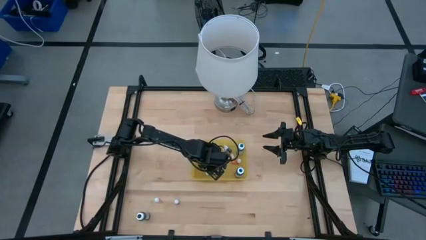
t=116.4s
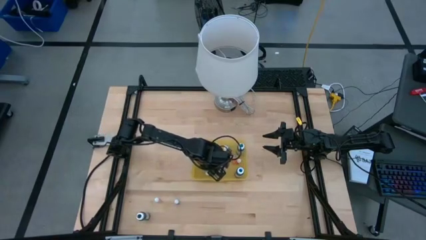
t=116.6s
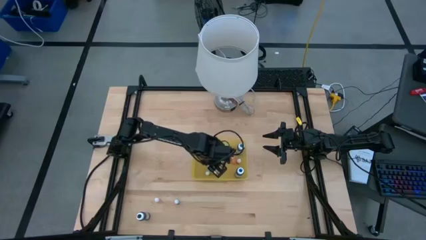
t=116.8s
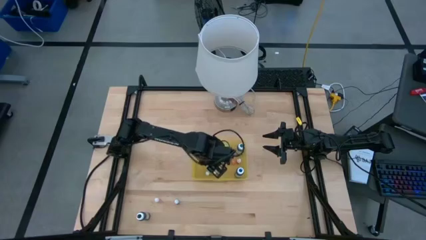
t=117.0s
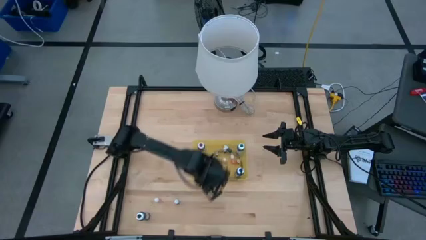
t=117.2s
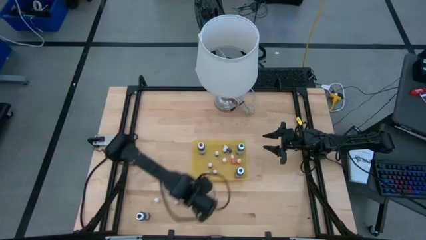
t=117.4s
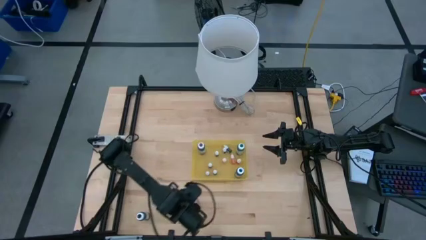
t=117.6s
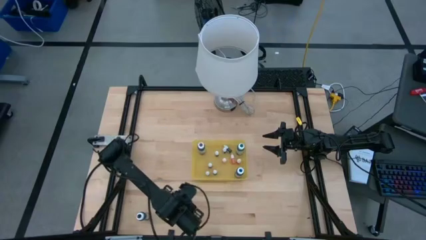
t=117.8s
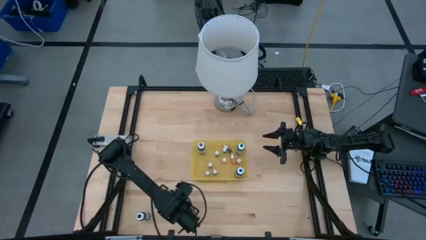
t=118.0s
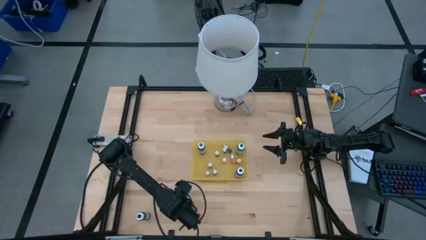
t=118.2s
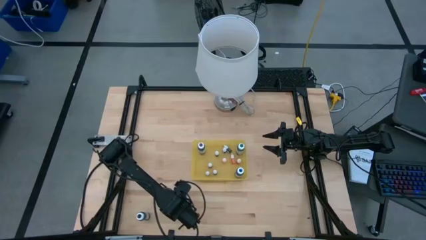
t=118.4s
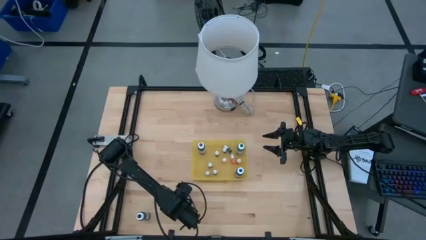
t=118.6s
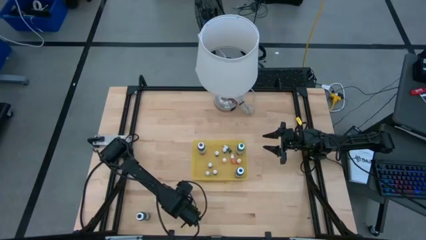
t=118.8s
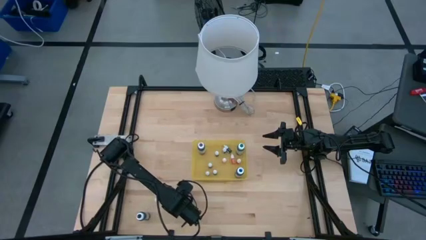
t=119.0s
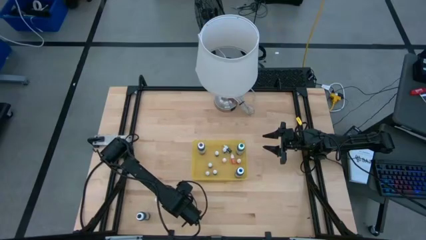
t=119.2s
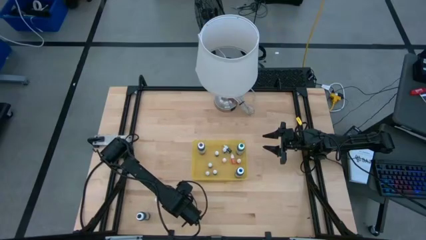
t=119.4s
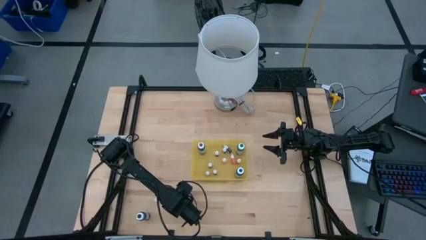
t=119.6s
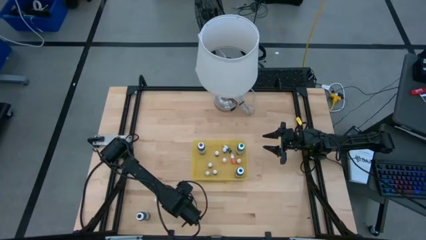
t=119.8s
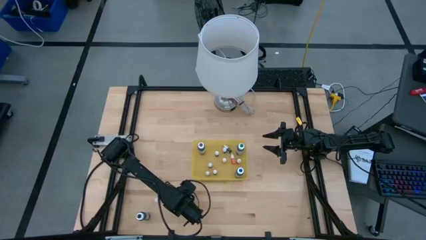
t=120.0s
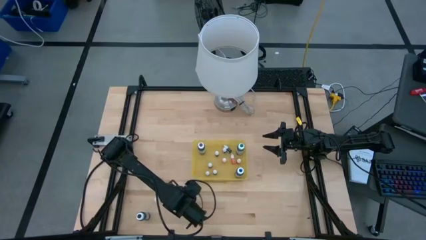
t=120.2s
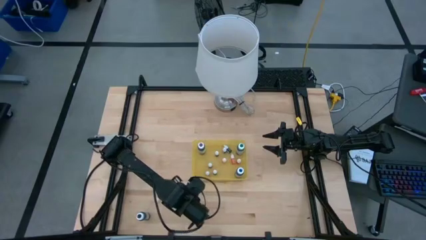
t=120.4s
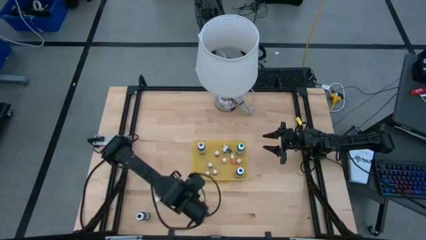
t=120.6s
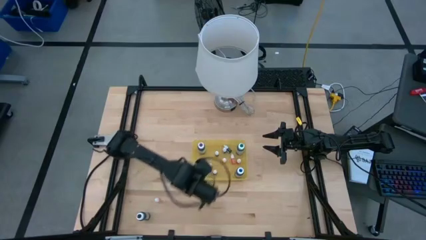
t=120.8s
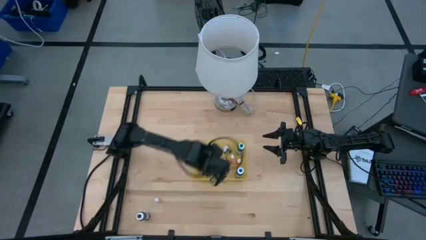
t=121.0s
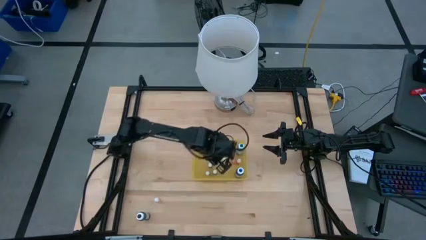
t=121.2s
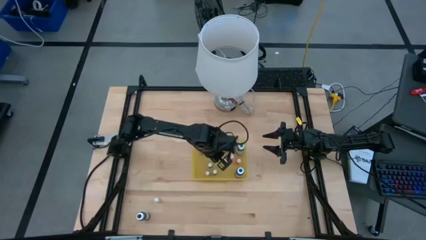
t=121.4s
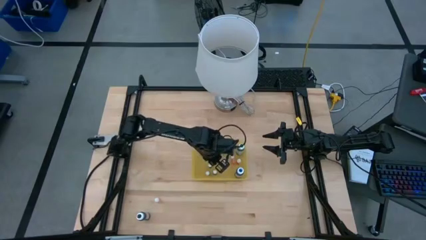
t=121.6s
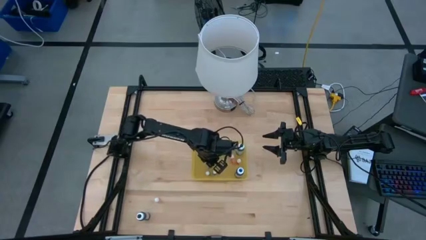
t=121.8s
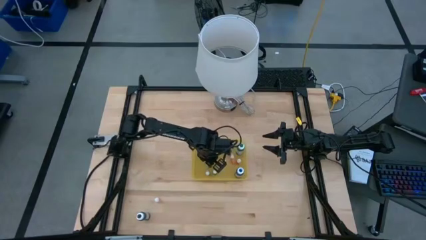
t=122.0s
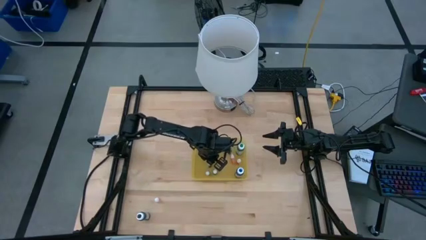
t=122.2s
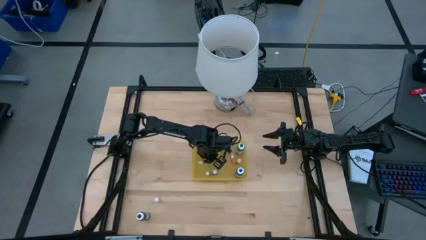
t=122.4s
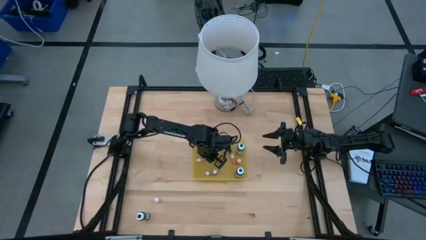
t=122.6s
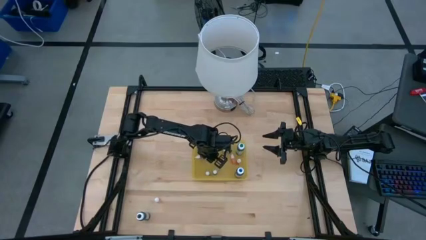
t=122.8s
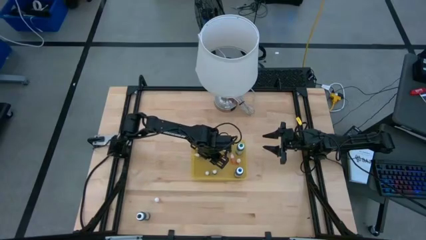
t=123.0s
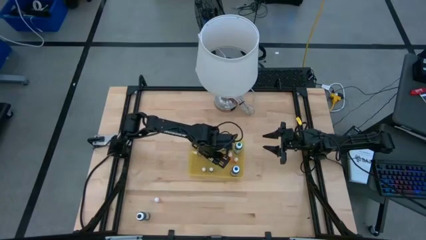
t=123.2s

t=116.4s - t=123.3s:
Task: Pick & Place food coloring
Put the blue food coloring bottle into the yellow bin

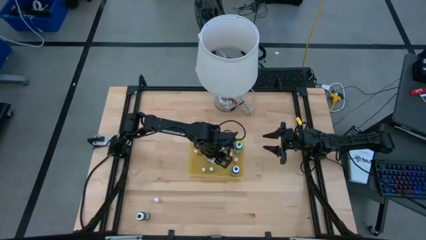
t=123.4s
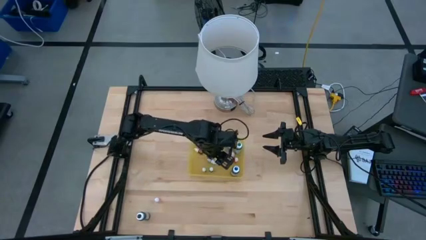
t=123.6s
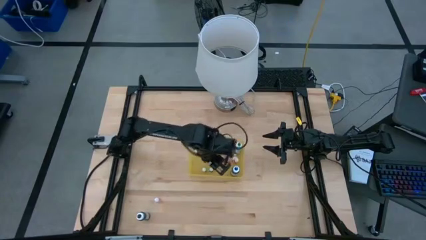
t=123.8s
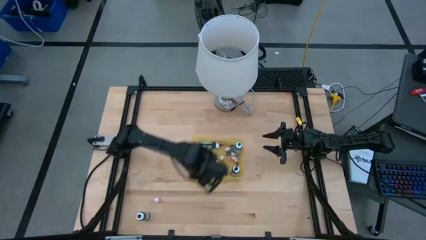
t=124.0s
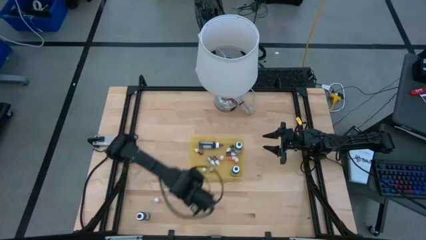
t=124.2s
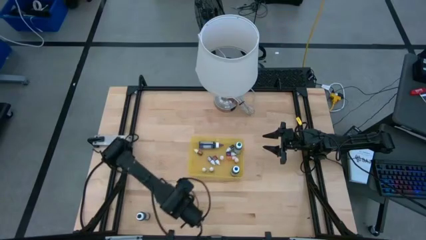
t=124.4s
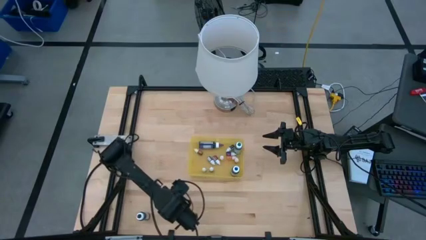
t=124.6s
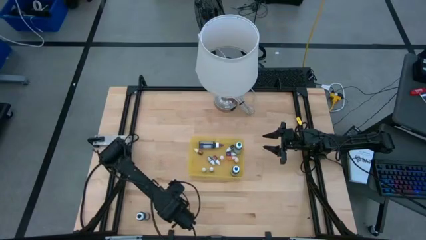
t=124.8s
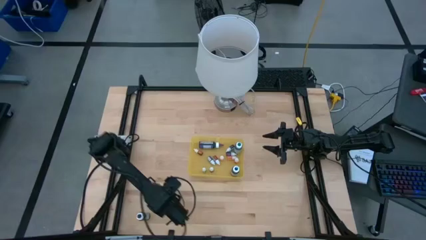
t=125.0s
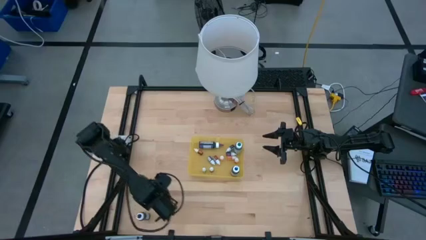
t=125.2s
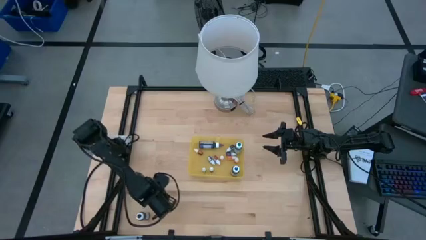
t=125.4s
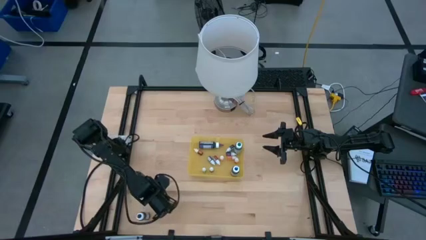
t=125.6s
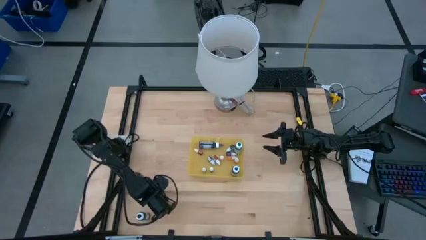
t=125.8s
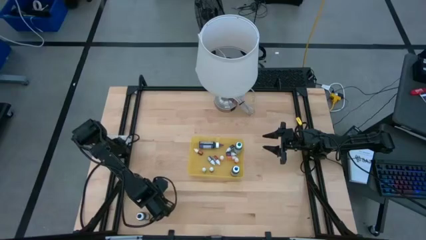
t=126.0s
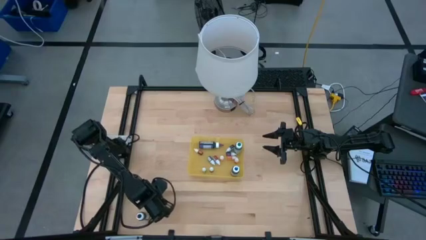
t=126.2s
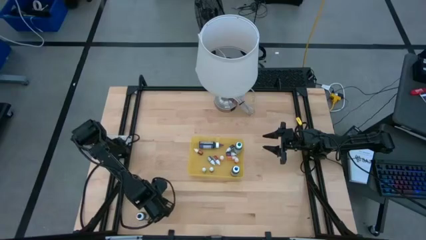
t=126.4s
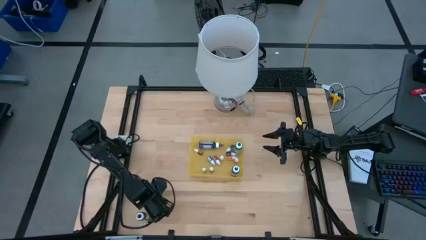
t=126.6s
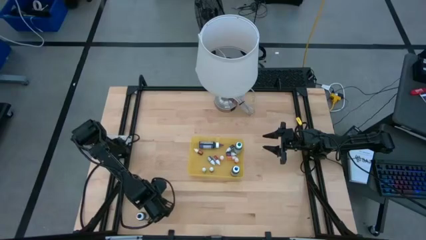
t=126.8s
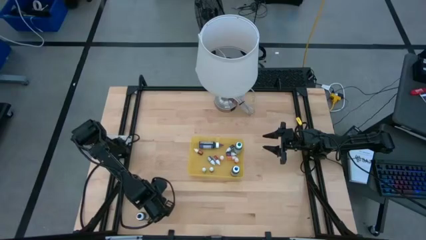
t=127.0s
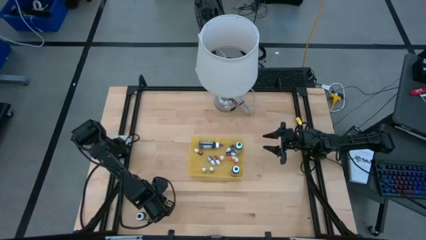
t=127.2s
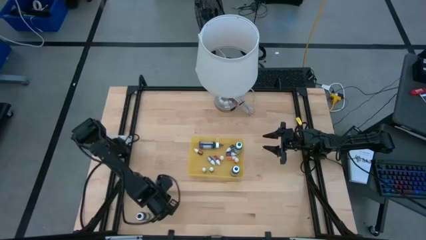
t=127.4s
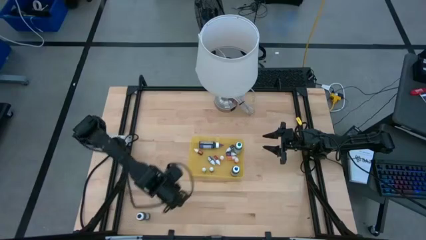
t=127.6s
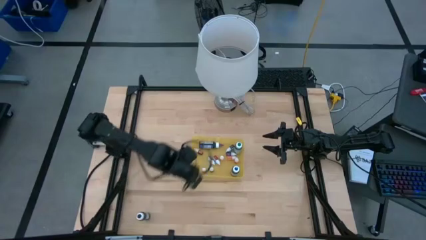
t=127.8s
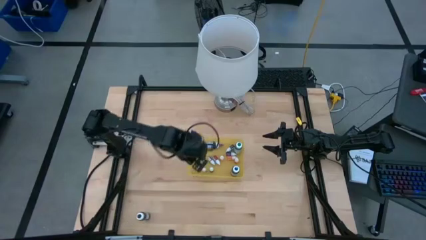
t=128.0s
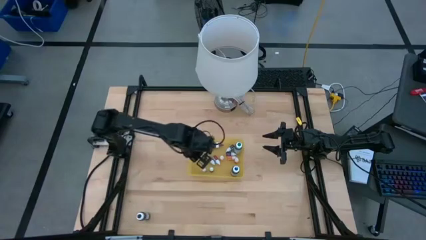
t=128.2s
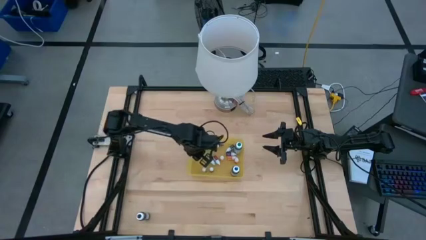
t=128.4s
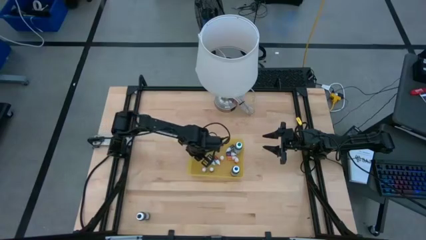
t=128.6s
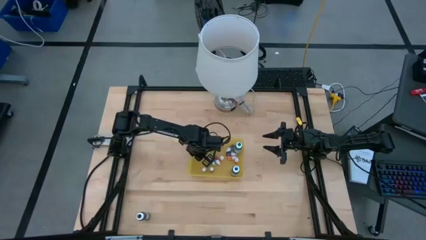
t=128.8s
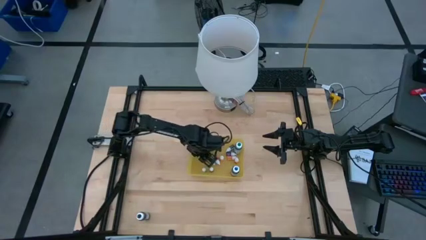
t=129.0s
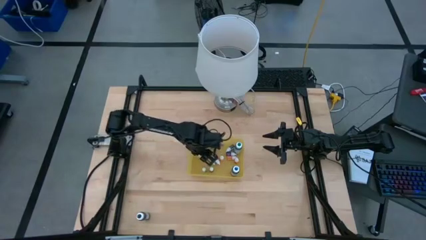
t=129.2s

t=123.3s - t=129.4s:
Put the orange food coloring bottle into the yellow bin

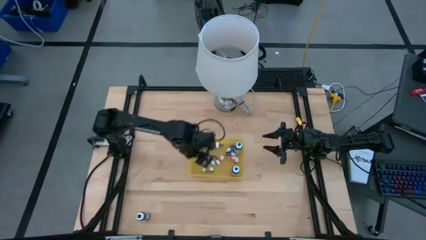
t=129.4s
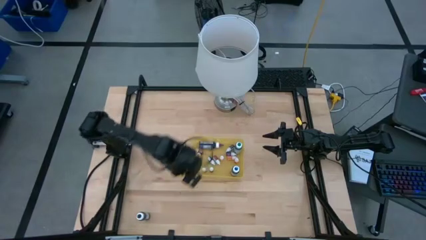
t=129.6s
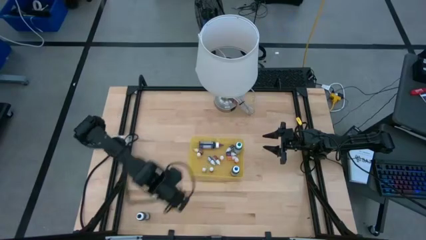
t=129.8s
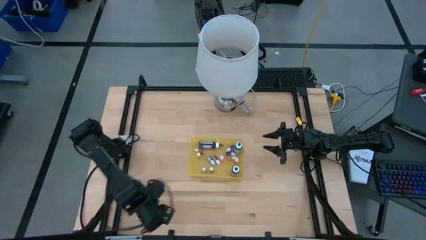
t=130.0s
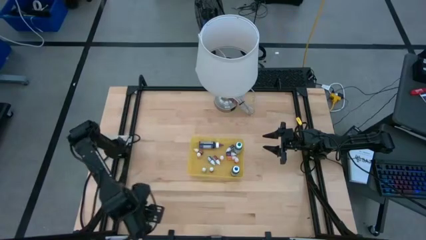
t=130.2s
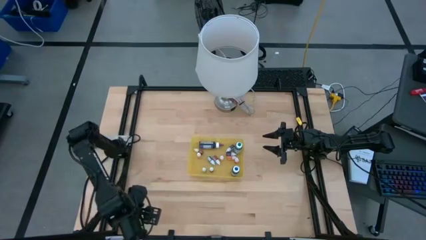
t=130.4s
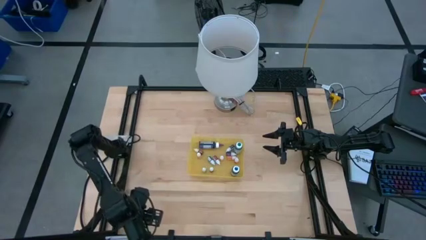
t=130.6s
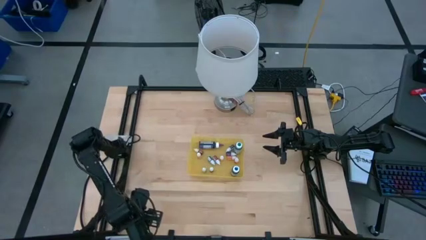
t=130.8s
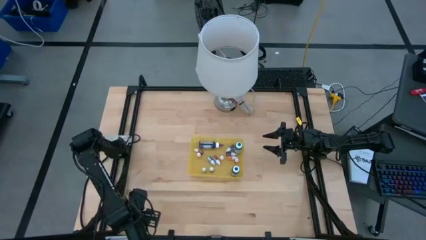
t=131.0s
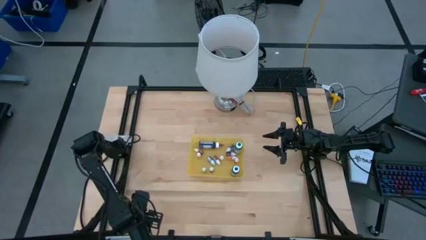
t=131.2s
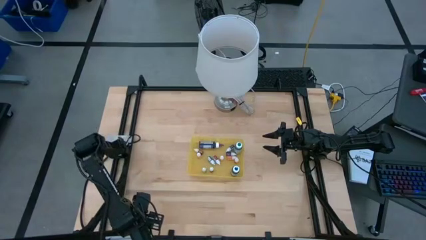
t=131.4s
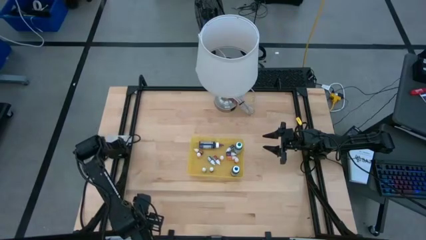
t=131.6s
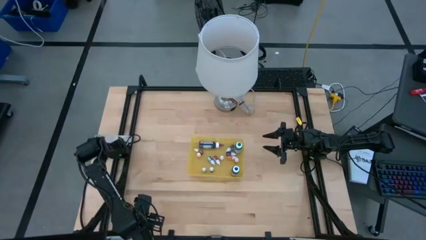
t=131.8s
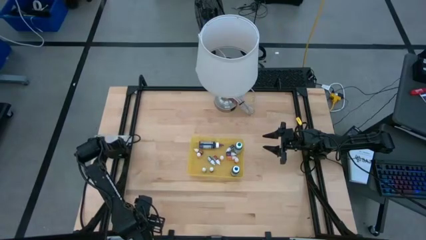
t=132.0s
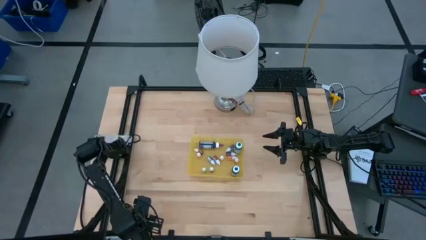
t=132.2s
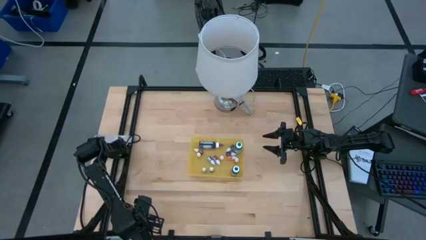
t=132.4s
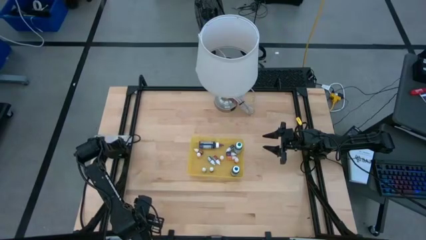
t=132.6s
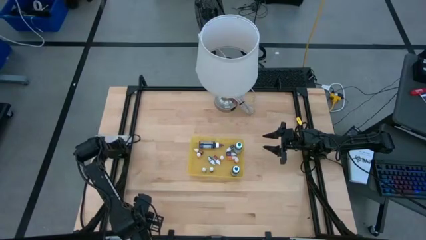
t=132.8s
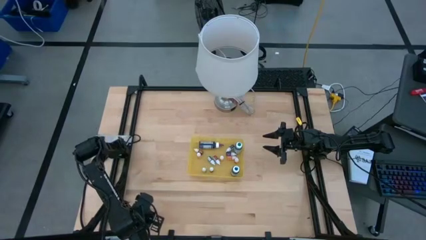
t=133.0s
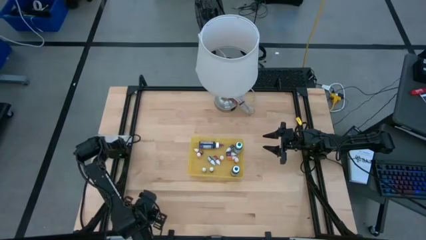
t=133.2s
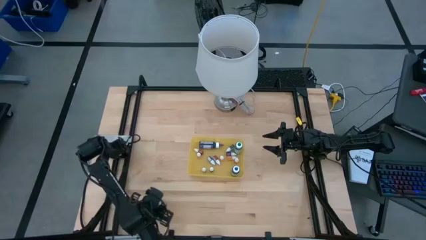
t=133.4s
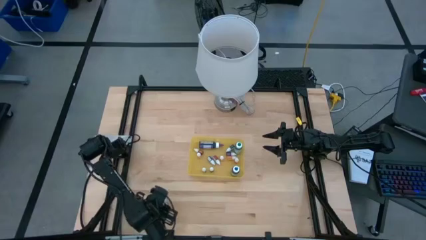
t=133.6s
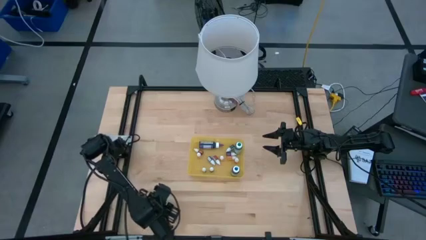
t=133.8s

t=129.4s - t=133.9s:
Put the black food coloring bottle into the yellow bin
